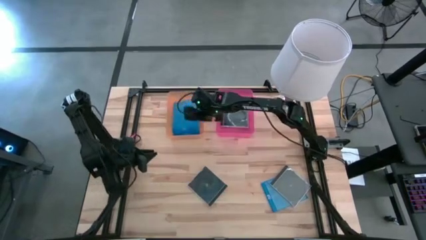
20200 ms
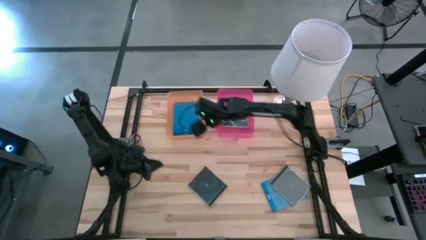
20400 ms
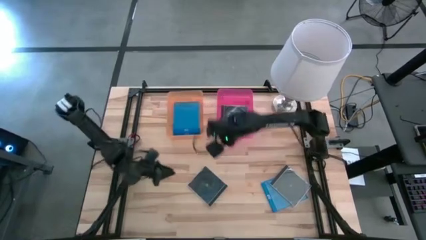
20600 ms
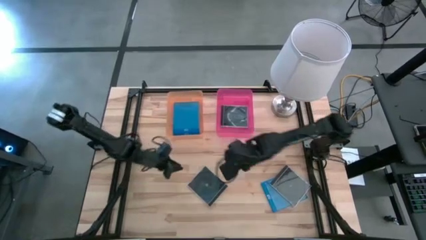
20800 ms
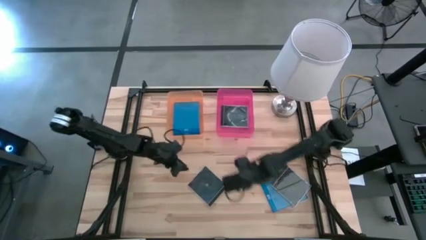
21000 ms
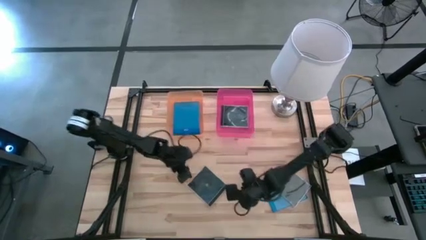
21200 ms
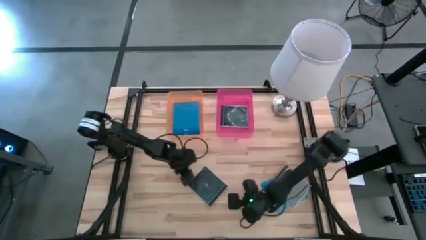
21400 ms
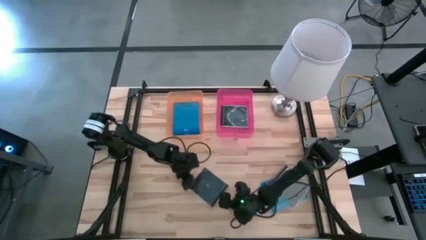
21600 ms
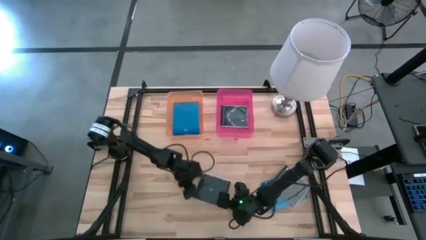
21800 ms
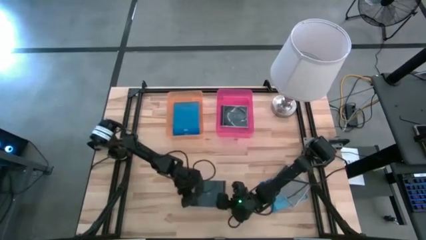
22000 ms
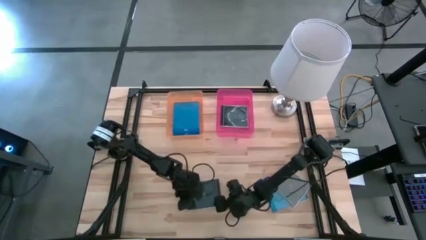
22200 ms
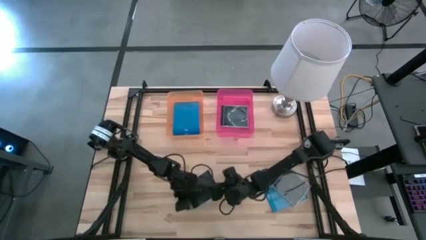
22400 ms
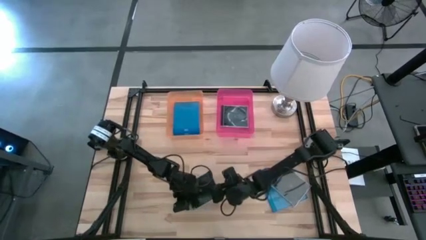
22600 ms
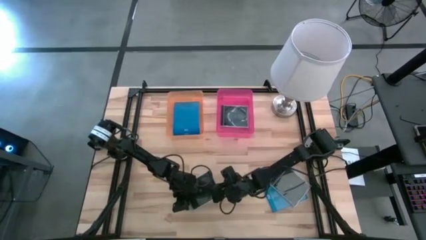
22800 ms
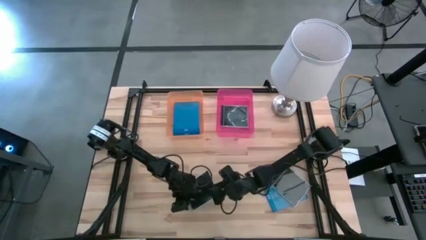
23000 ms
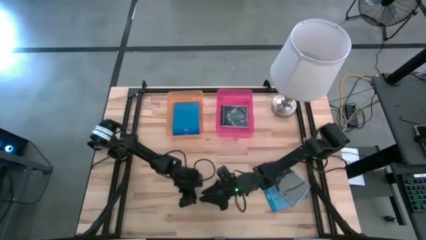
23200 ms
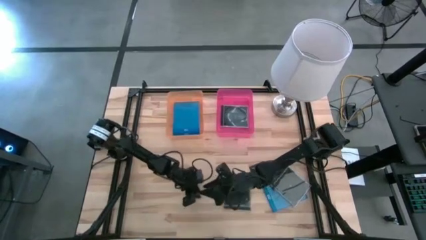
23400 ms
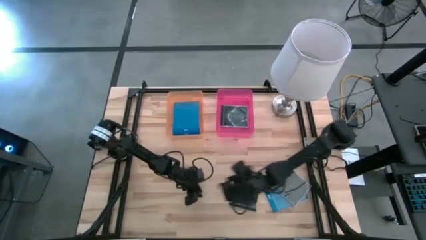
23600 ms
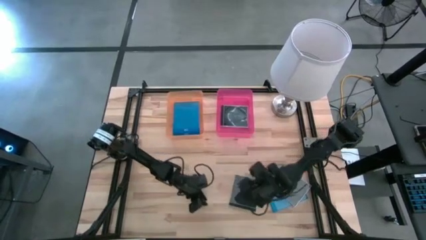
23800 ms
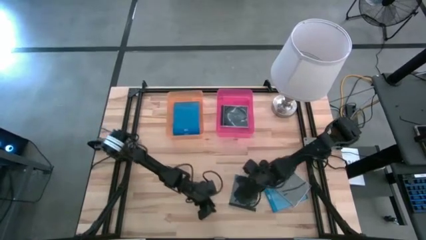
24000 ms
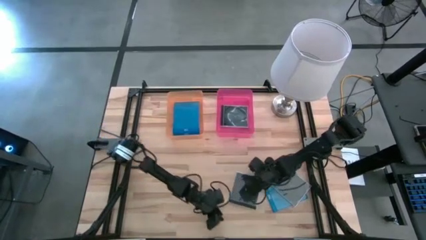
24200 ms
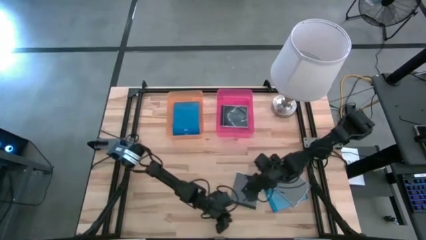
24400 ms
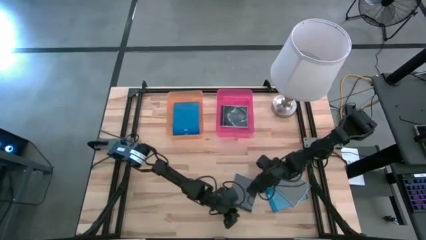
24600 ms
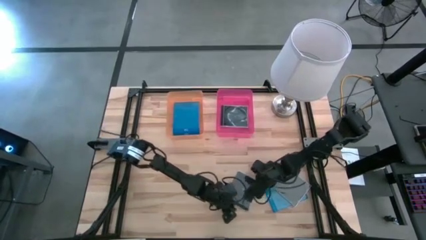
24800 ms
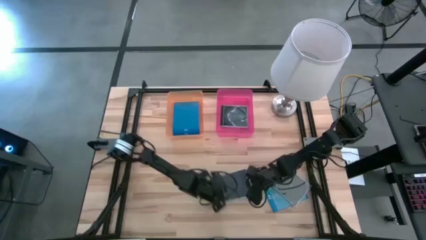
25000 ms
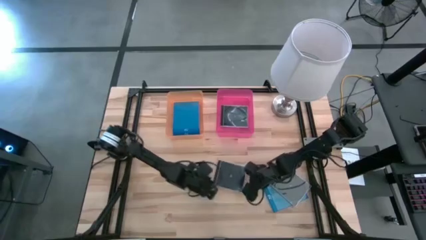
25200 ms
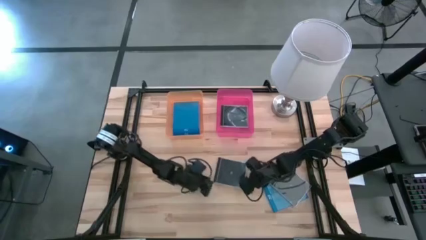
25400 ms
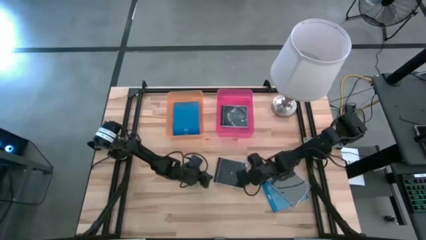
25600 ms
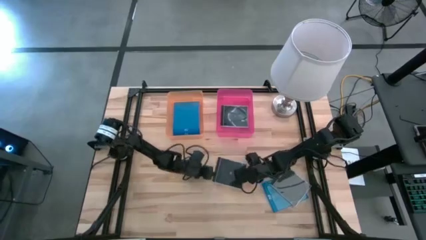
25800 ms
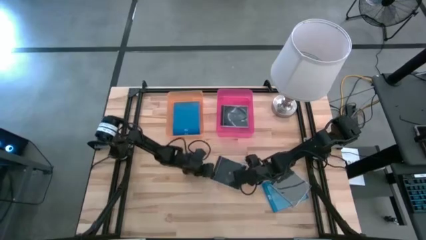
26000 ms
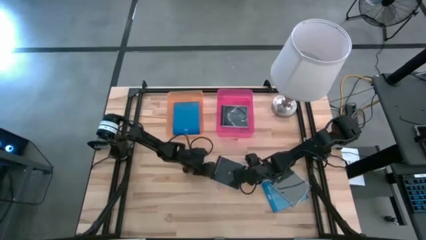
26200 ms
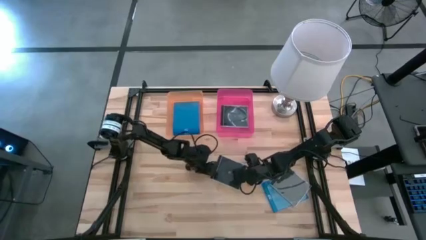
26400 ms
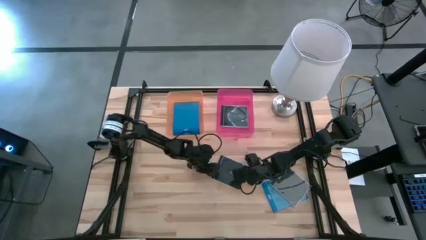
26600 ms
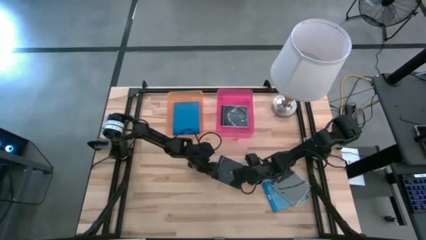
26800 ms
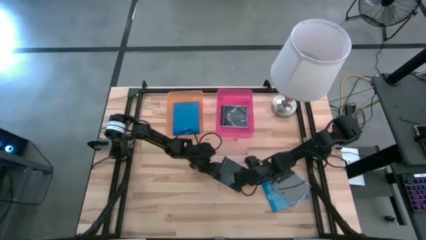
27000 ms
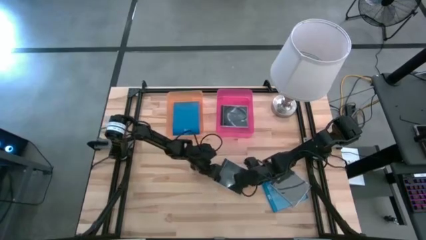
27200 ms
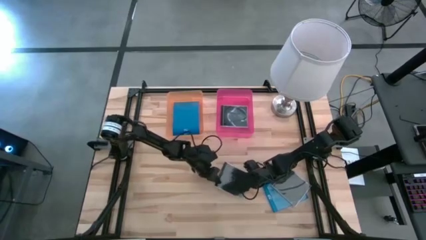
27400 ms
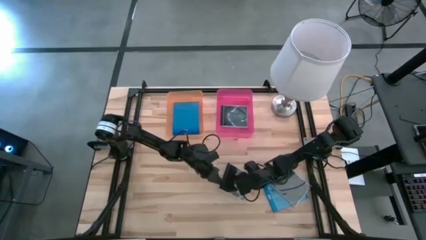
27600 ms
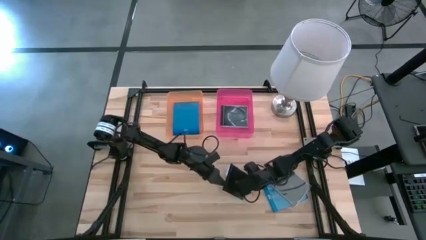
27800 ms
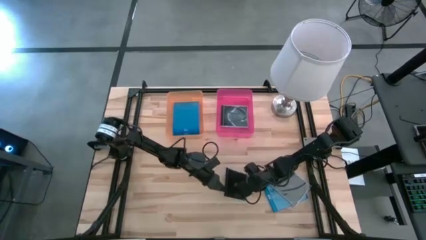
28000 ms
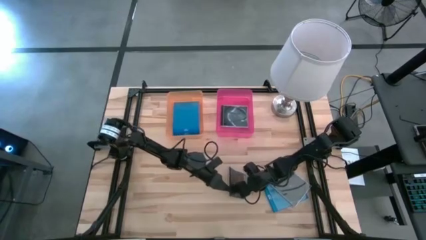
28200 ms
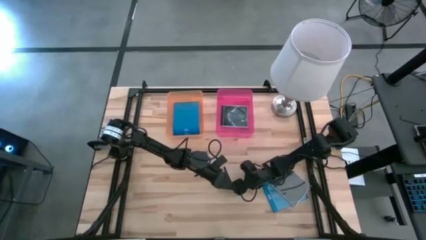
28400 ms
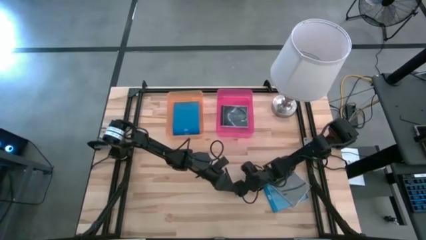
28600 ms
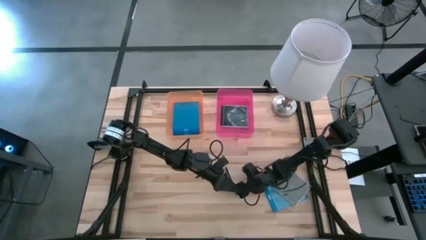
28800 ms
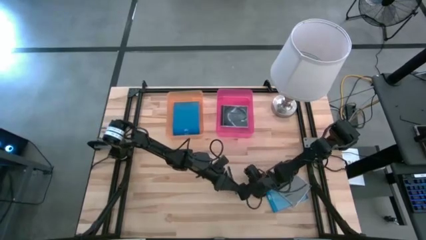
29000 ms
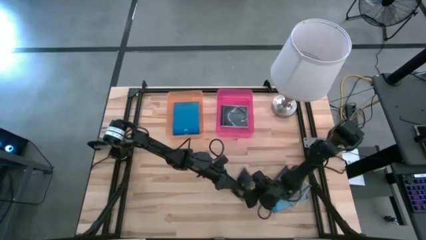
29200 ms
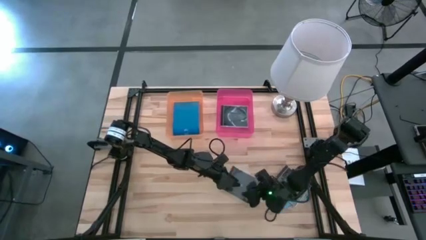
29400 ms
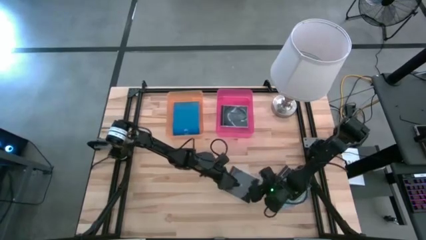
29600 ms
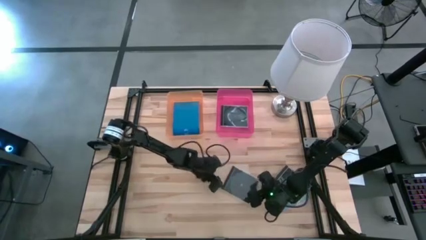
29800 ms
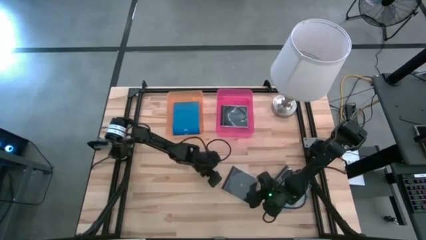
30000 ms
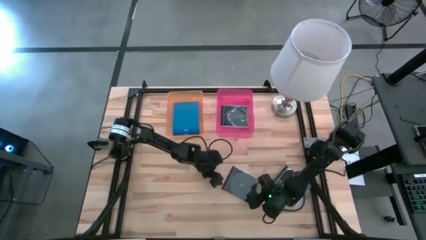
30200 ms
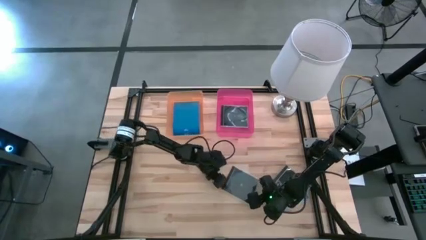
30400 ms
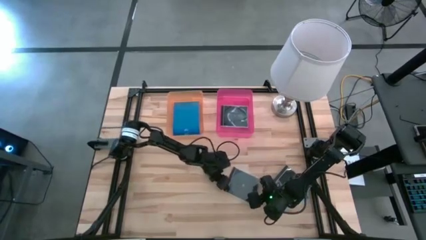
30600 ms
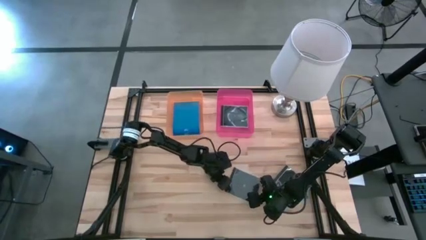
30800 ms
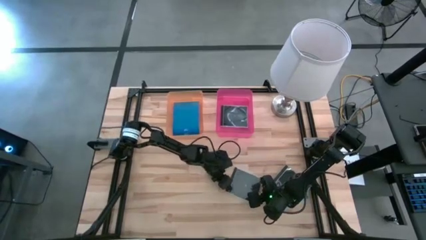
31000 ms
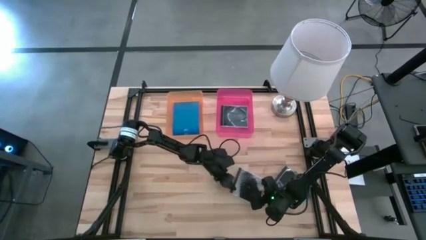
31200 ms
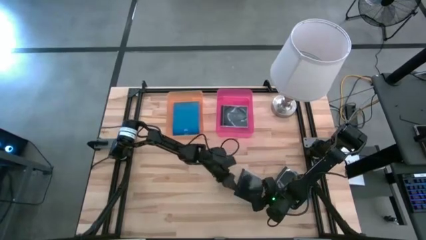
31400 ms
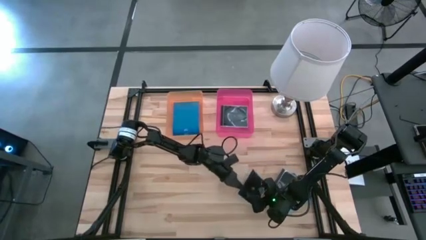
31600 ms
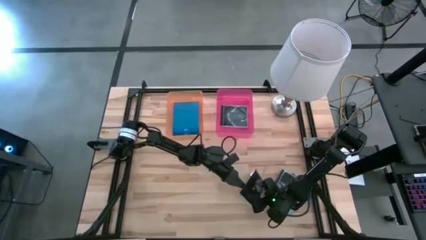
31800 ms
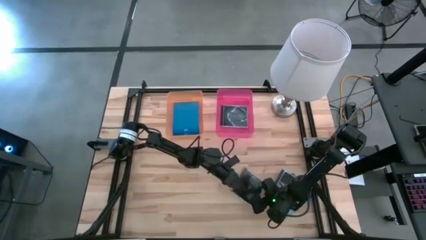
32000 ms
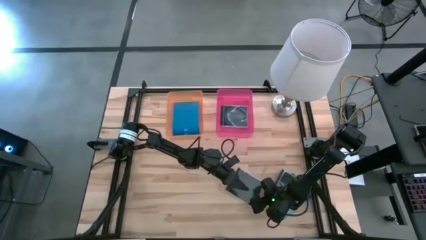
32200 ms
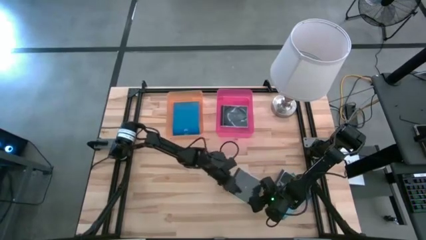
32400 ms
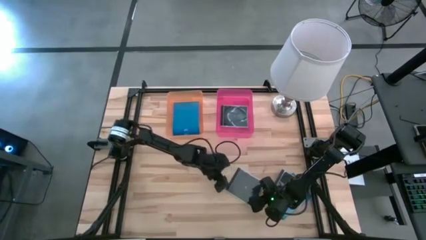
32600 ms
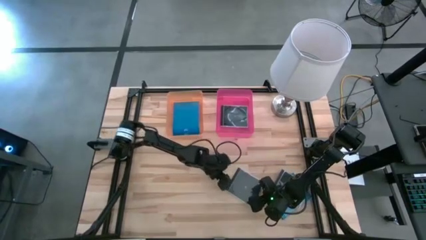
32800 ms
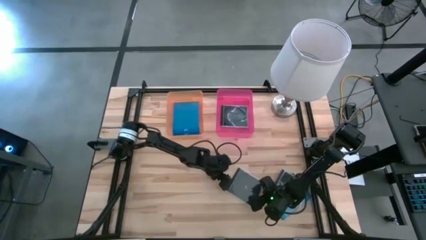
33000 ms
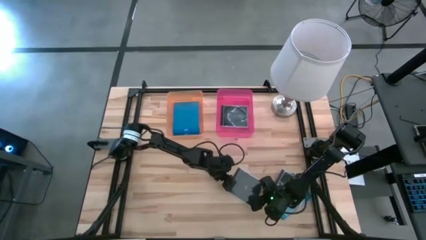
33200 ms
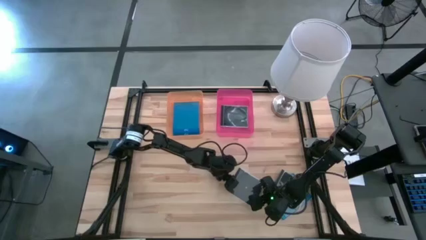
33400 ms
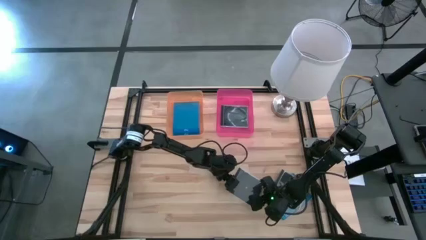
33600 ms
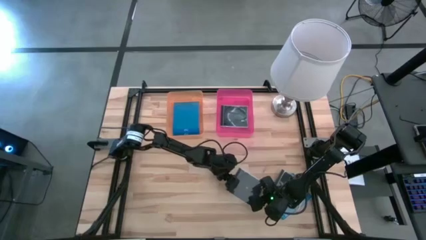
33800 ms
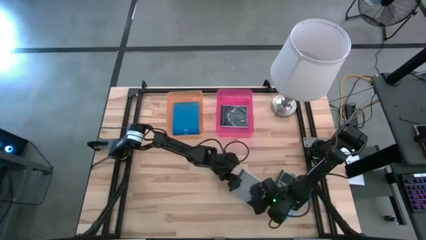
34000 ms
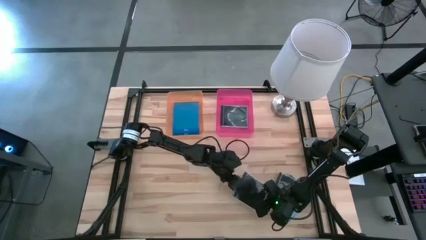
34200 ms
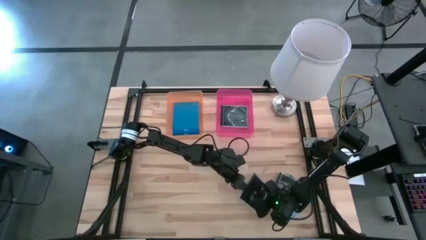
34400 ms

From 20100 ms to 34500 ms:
Task: Pick & place jewel cases by type
Put the left black CD case into the pink bin
